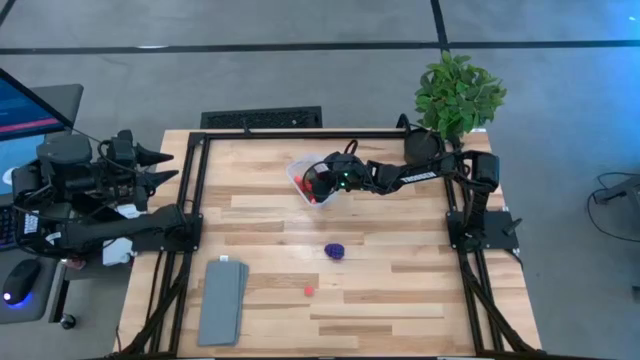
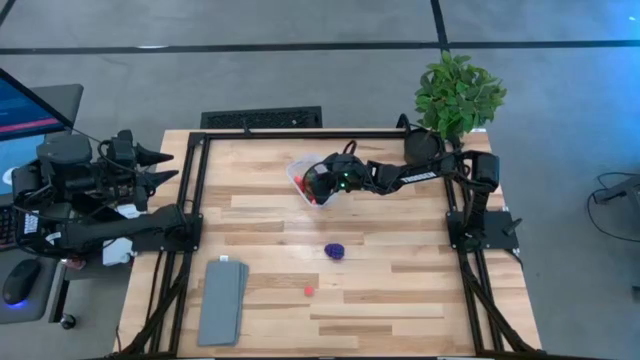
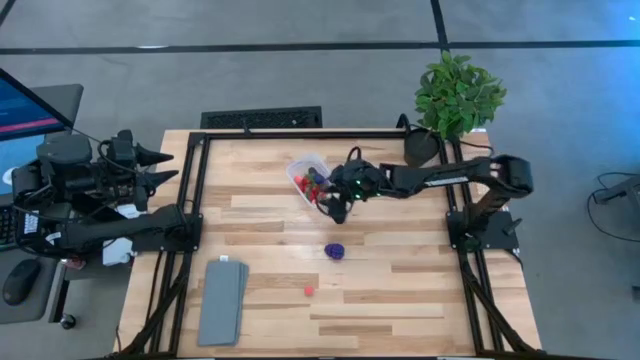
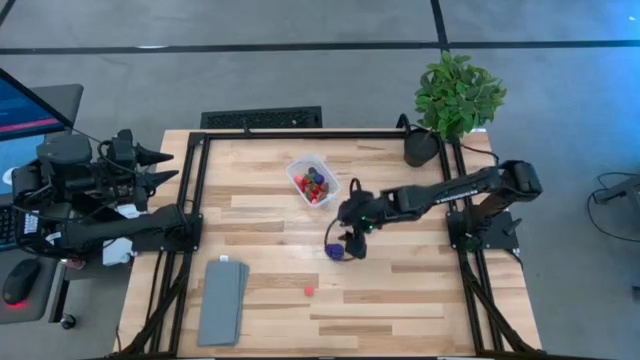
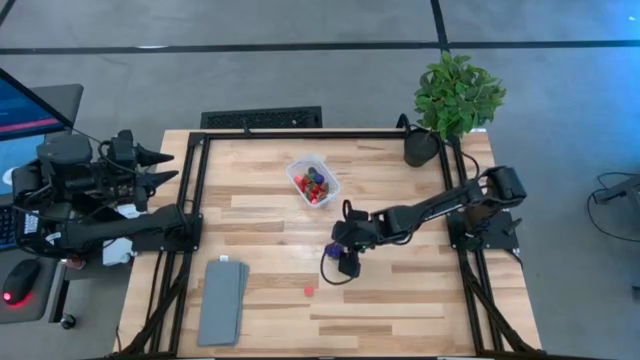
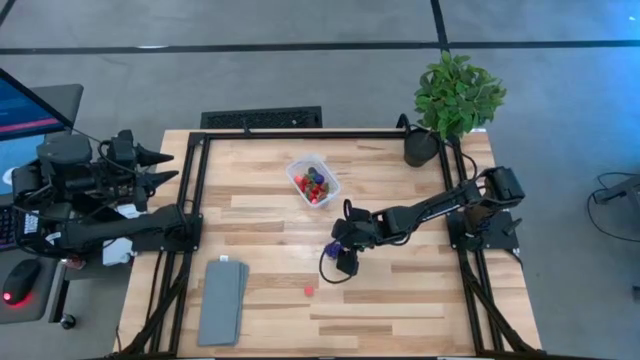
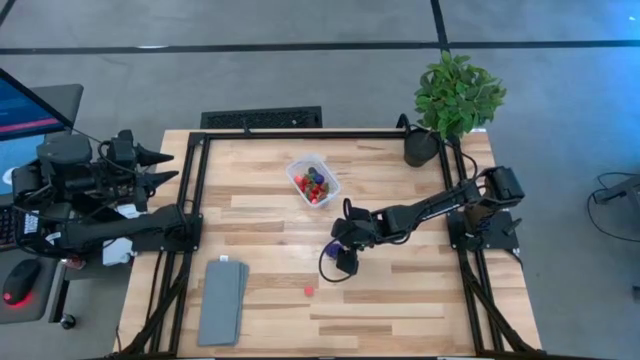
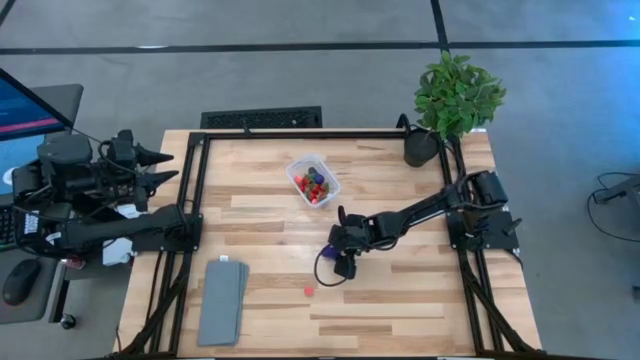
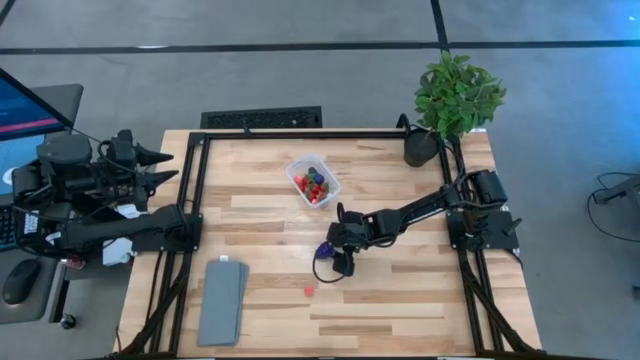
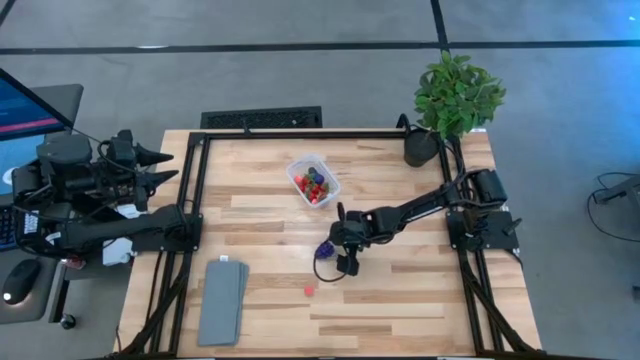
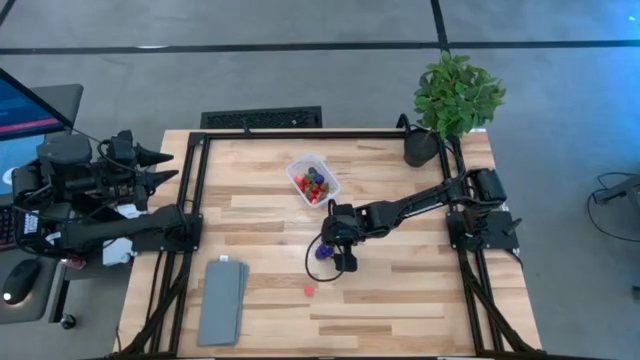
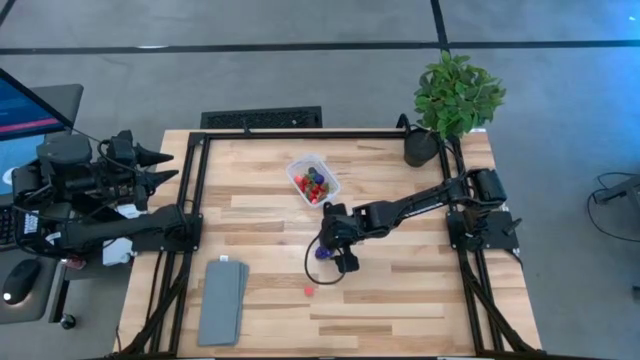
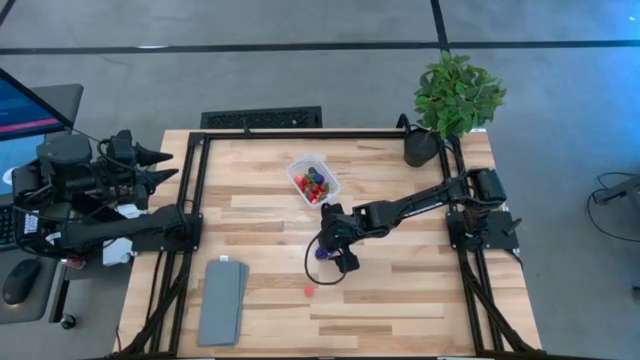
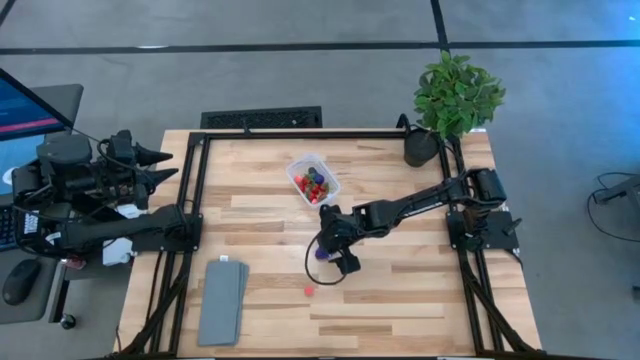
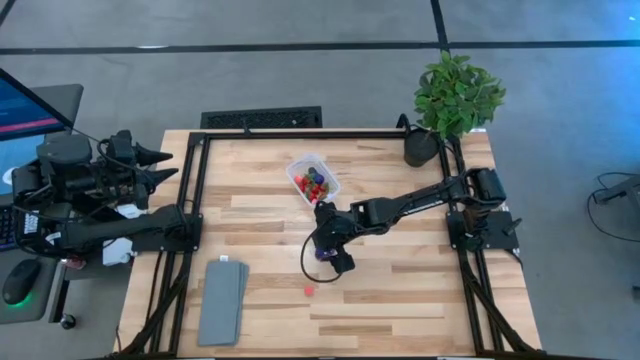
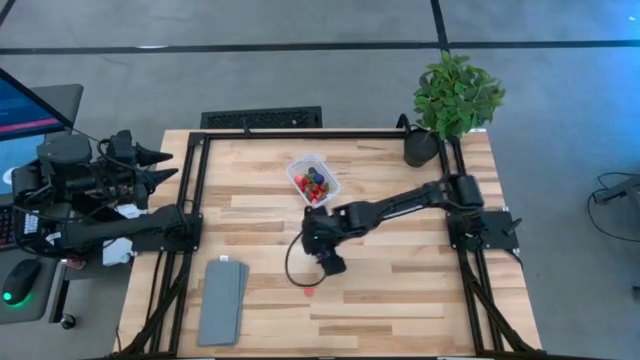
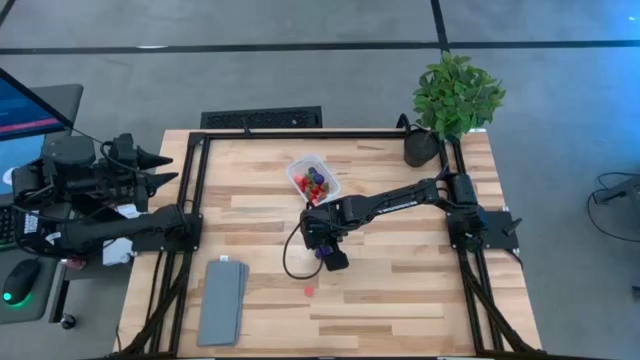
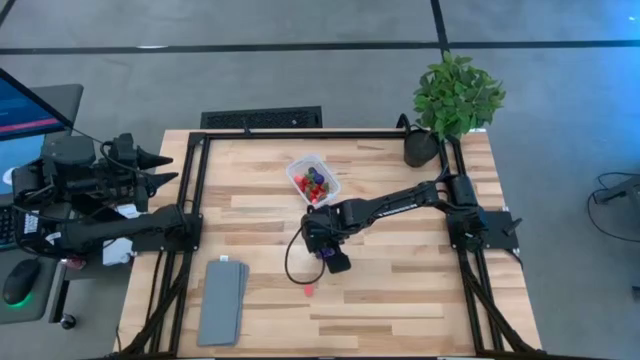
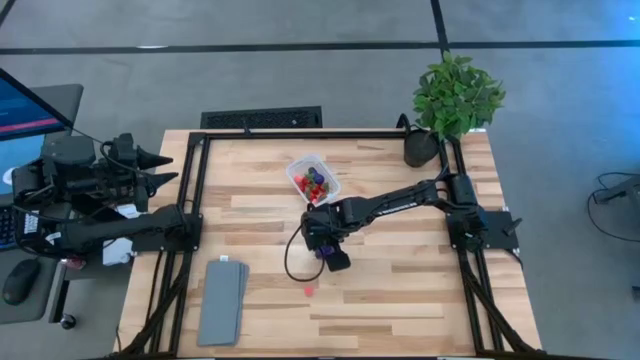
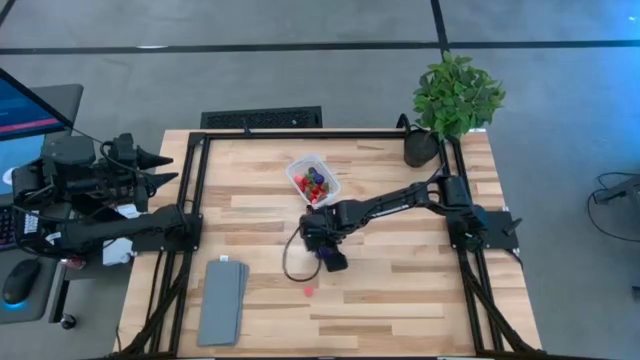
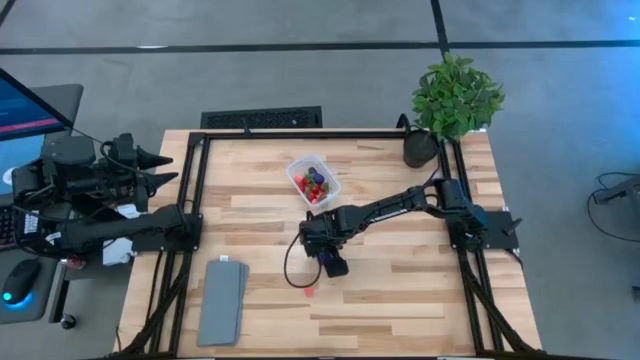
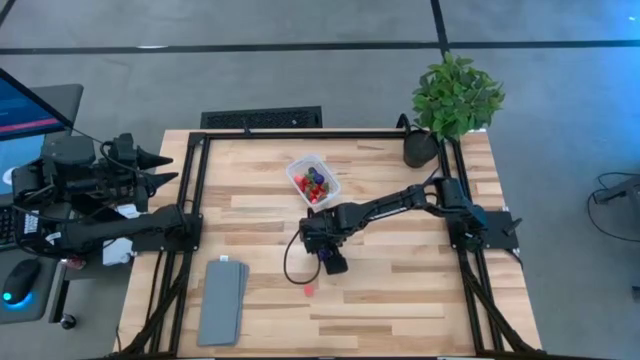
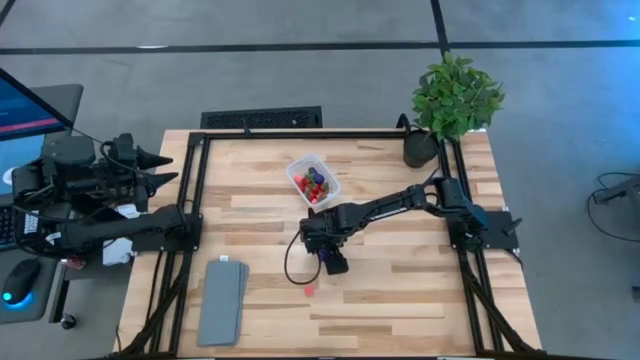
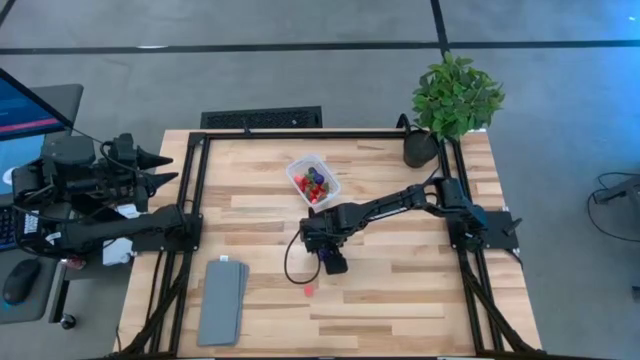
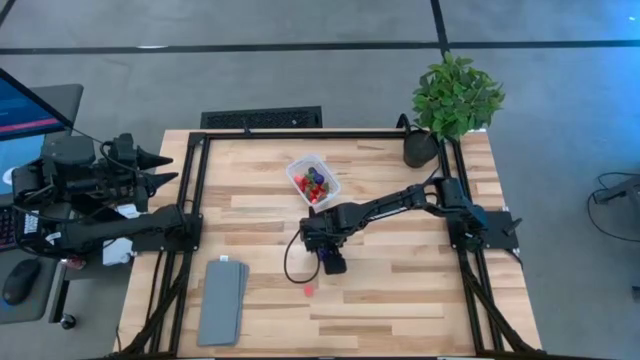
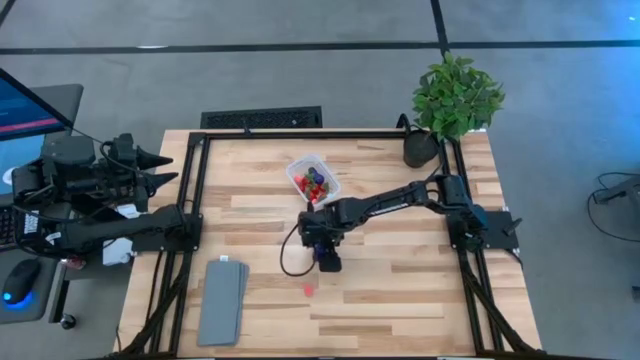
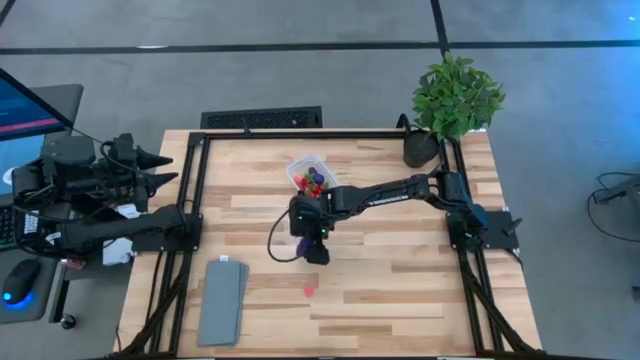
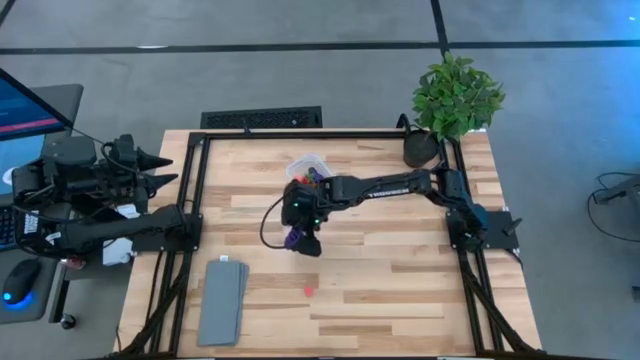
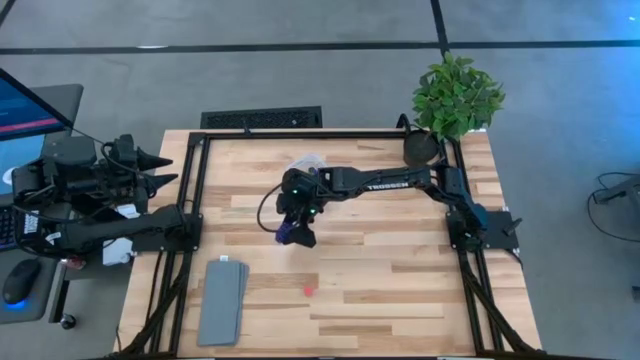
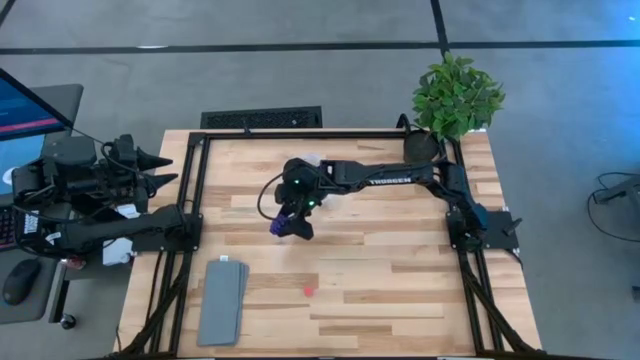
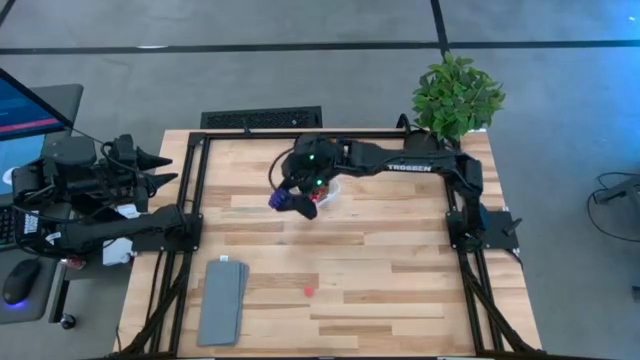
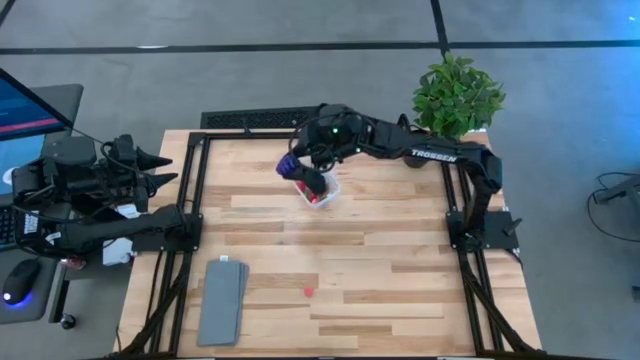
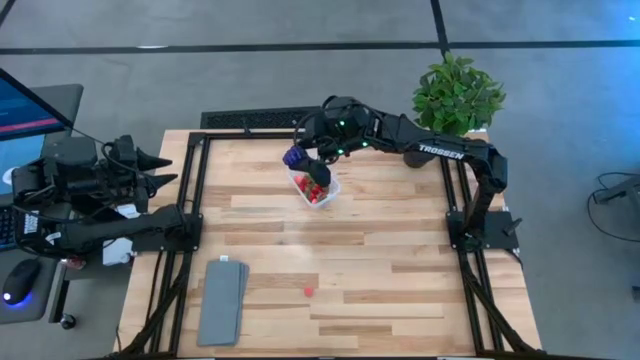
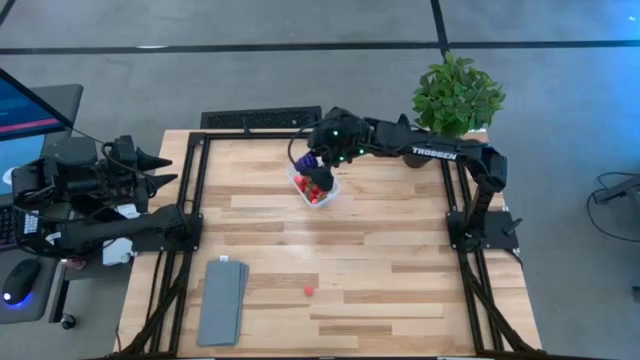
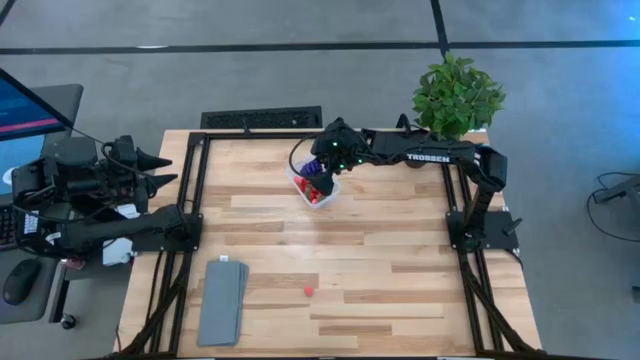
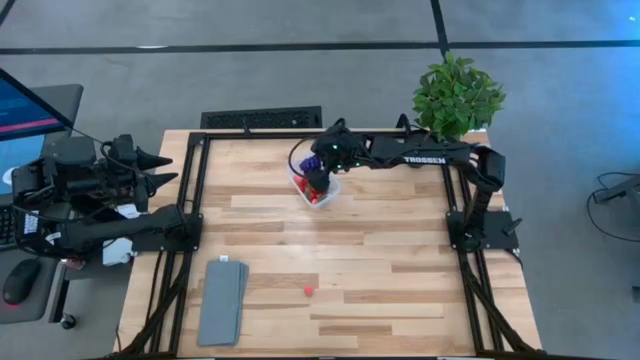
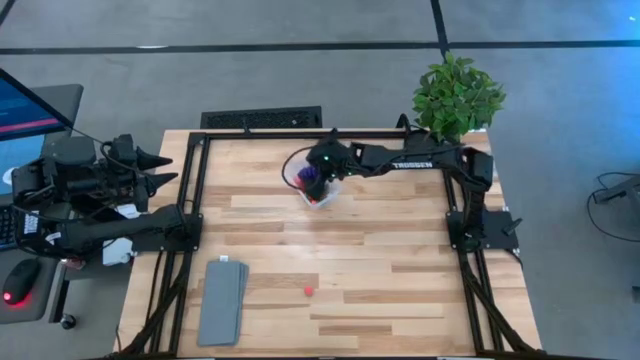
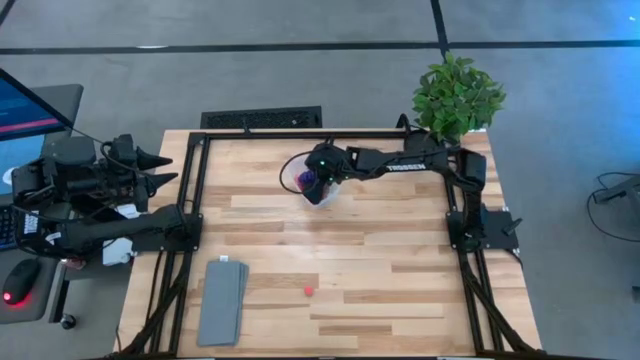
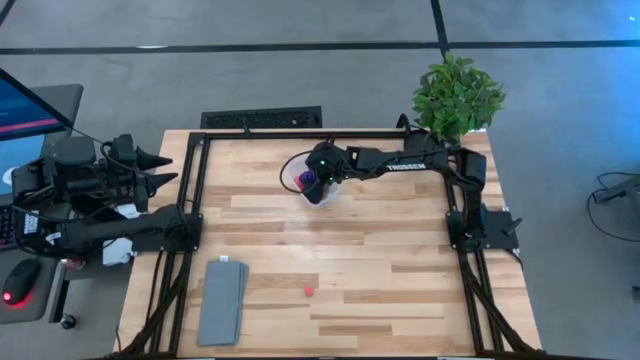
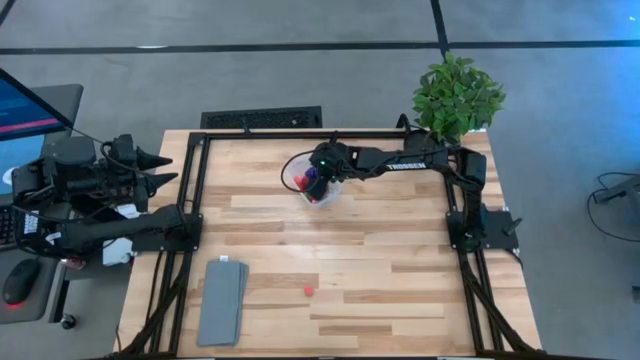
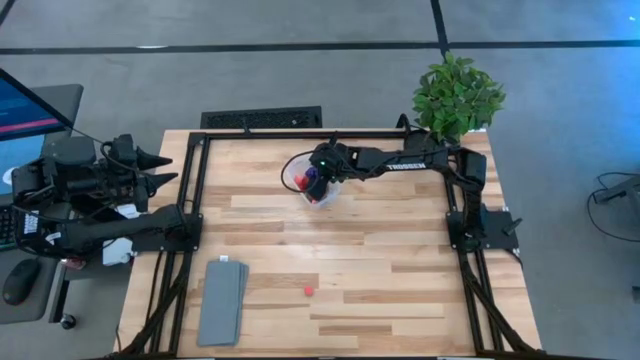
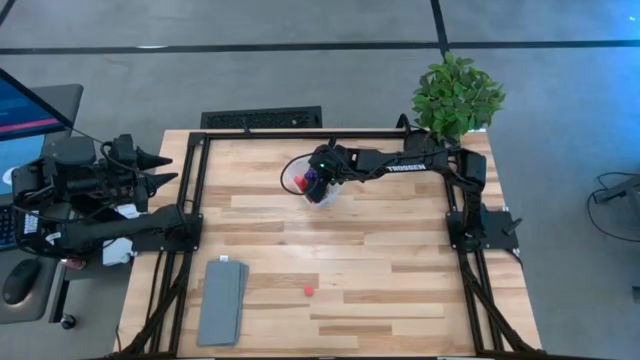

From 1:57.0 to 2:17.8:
Task: Pick and placing Produce into tupperware
Put the grapes into the transparent container
